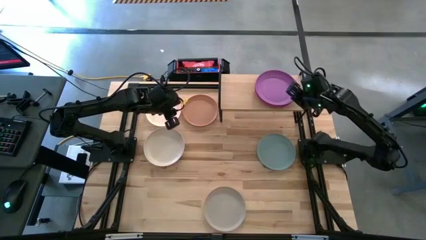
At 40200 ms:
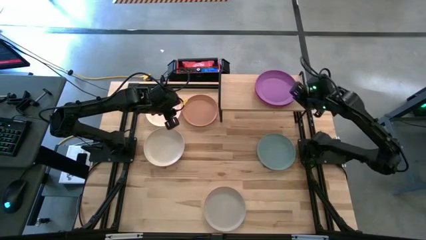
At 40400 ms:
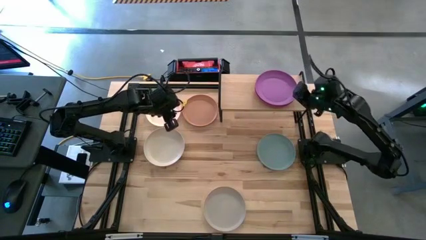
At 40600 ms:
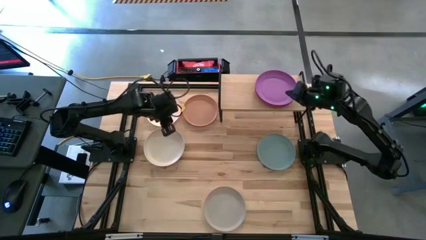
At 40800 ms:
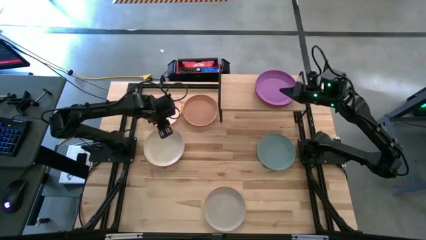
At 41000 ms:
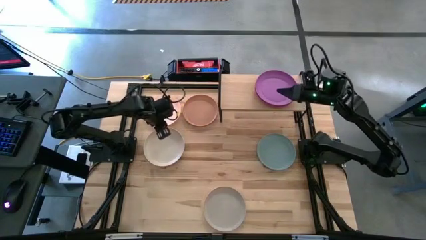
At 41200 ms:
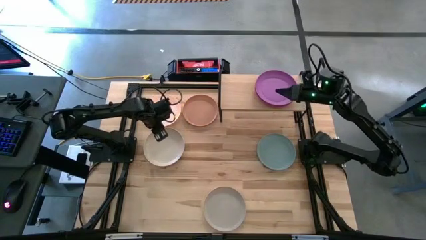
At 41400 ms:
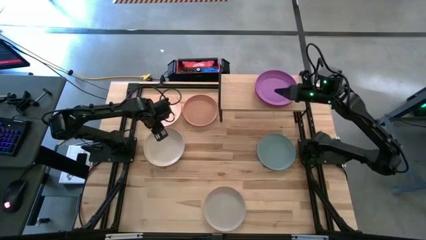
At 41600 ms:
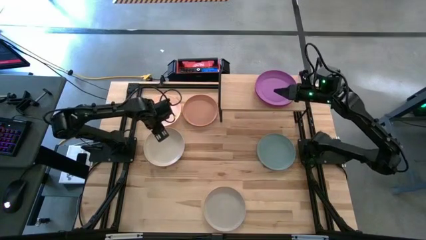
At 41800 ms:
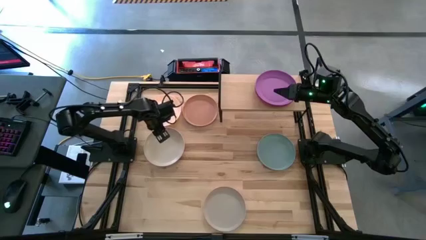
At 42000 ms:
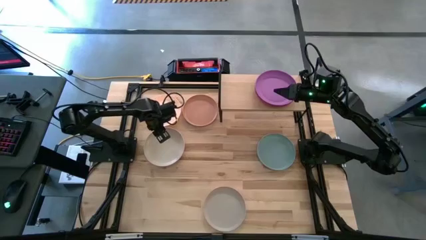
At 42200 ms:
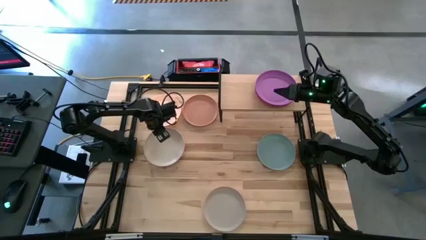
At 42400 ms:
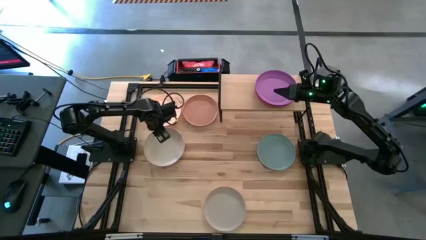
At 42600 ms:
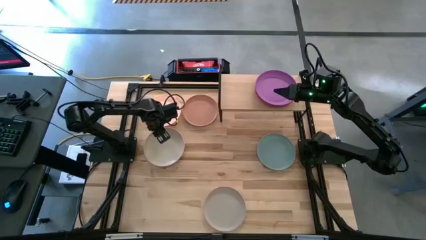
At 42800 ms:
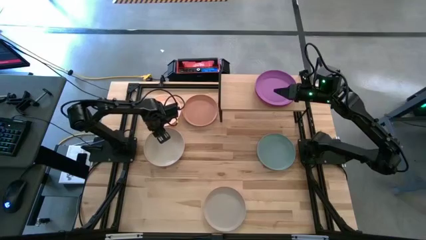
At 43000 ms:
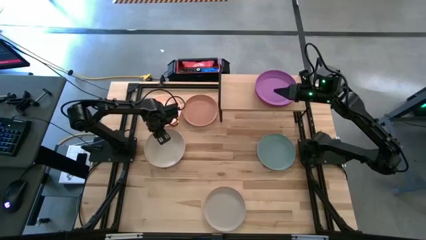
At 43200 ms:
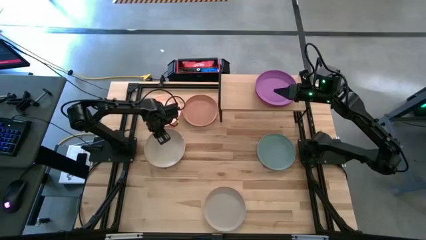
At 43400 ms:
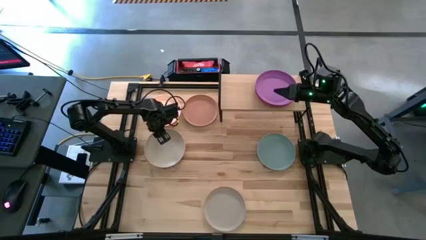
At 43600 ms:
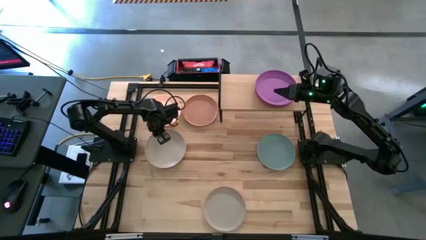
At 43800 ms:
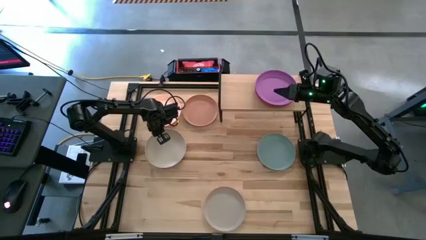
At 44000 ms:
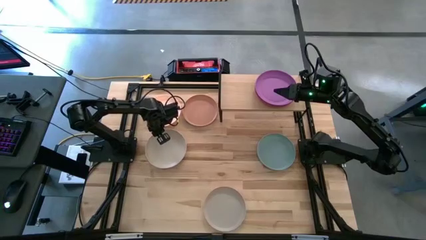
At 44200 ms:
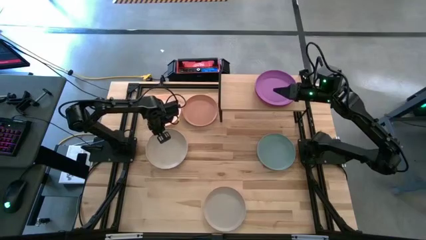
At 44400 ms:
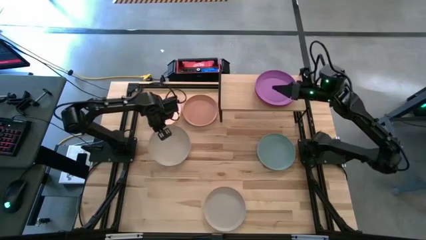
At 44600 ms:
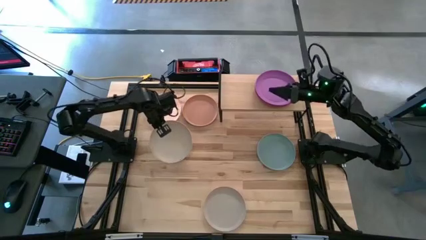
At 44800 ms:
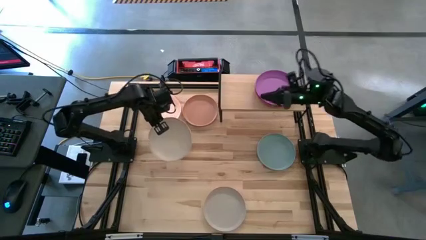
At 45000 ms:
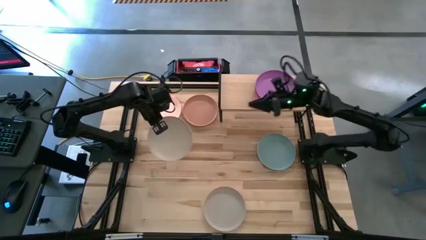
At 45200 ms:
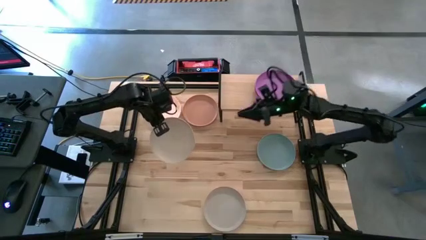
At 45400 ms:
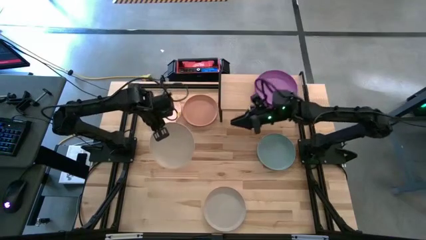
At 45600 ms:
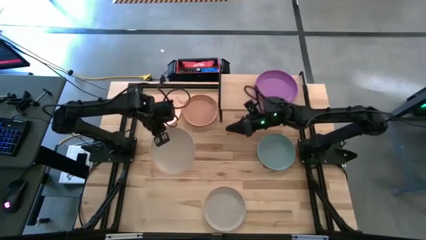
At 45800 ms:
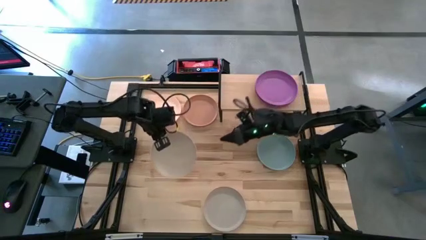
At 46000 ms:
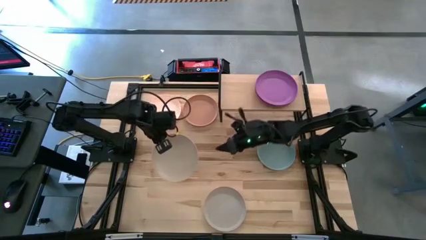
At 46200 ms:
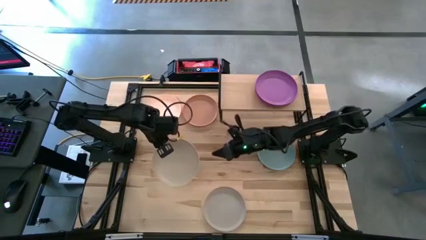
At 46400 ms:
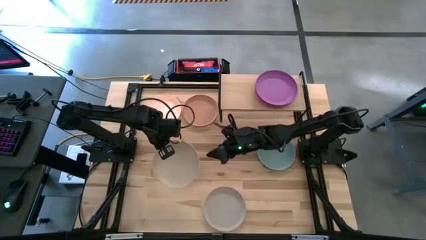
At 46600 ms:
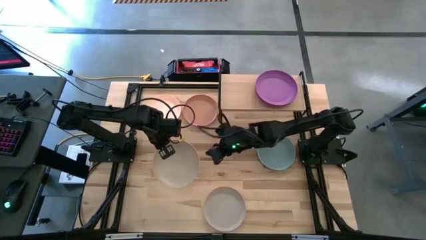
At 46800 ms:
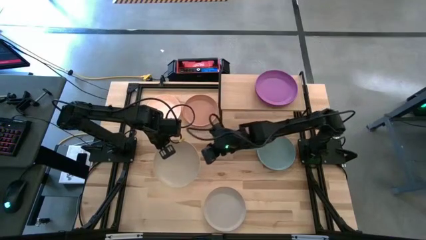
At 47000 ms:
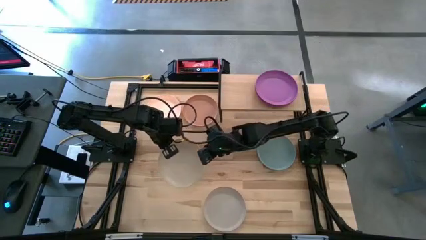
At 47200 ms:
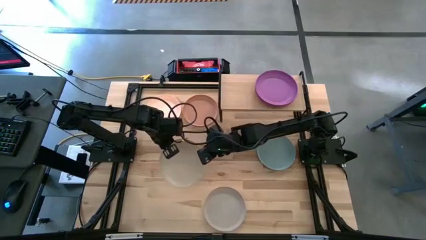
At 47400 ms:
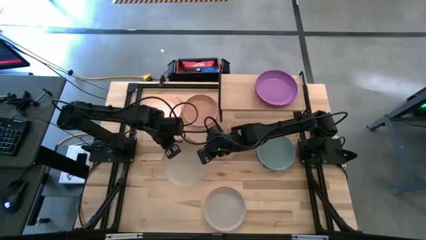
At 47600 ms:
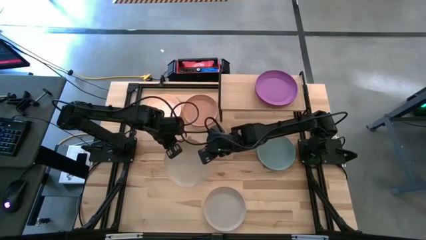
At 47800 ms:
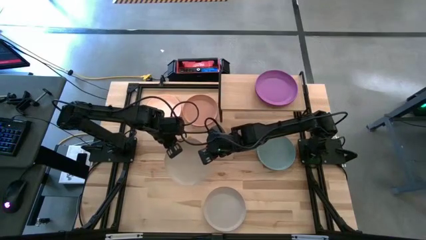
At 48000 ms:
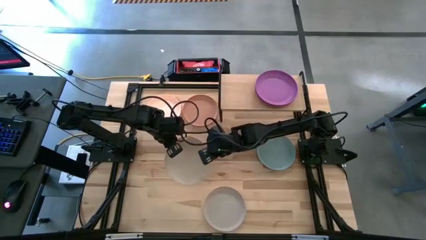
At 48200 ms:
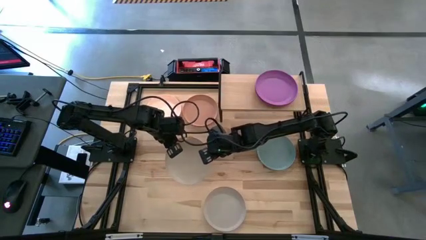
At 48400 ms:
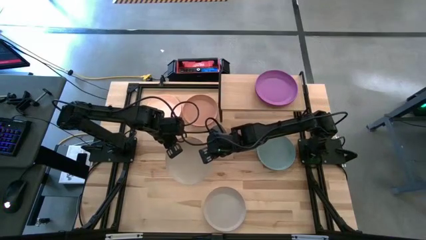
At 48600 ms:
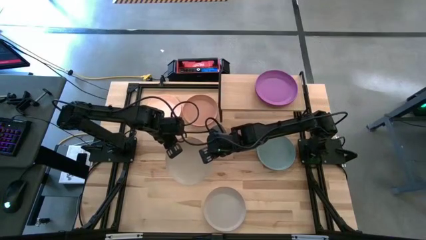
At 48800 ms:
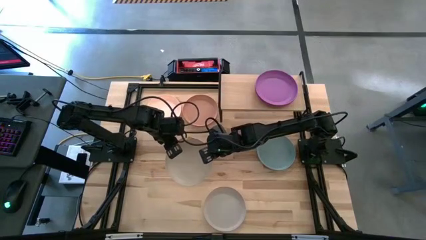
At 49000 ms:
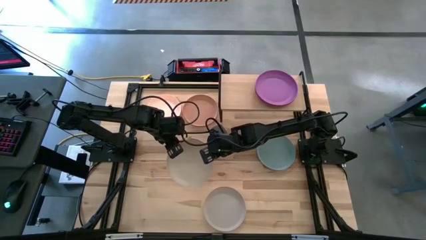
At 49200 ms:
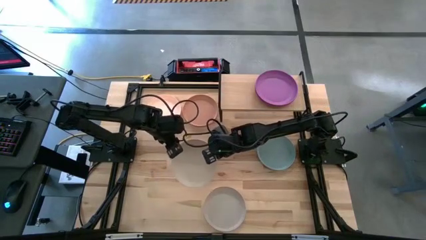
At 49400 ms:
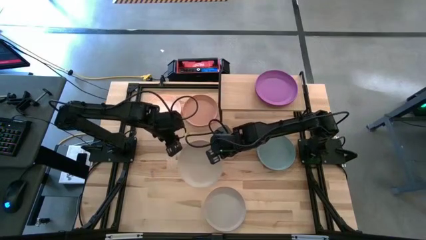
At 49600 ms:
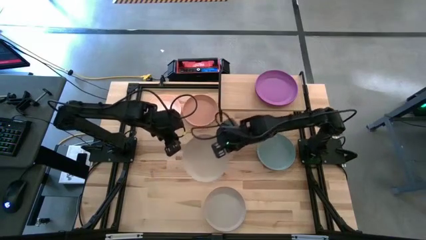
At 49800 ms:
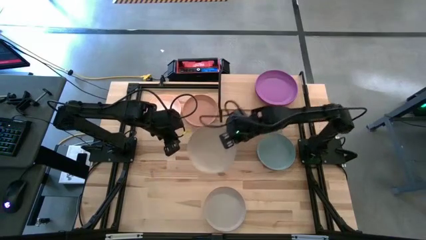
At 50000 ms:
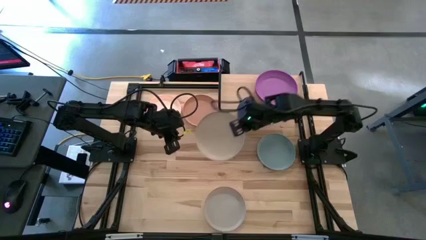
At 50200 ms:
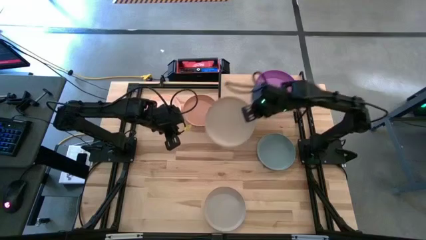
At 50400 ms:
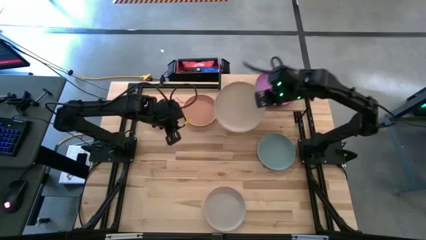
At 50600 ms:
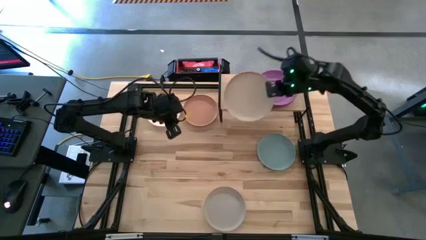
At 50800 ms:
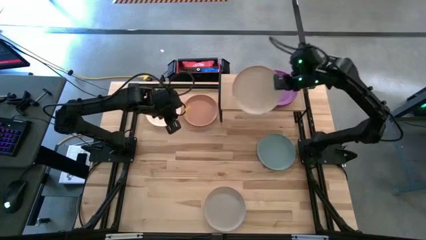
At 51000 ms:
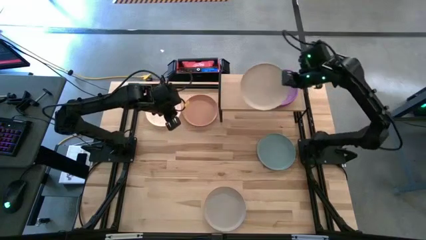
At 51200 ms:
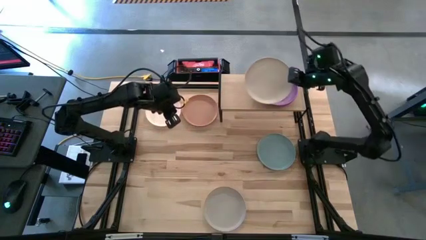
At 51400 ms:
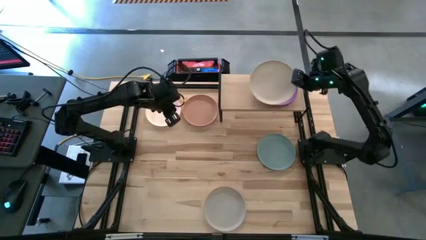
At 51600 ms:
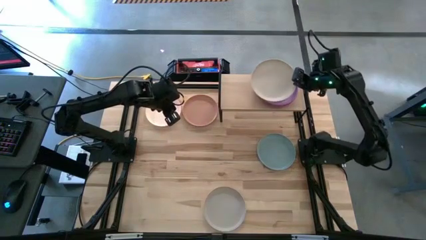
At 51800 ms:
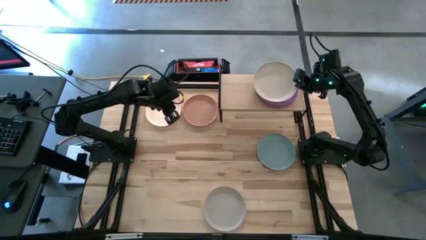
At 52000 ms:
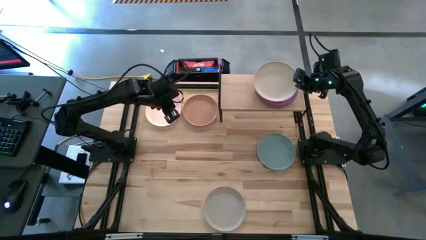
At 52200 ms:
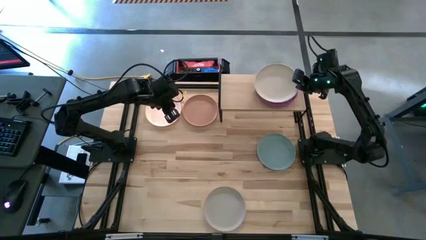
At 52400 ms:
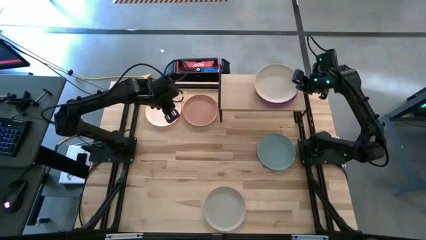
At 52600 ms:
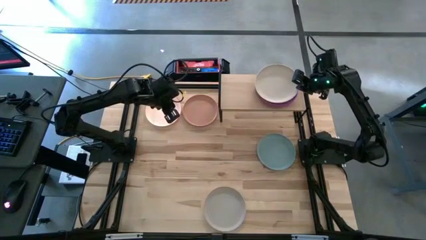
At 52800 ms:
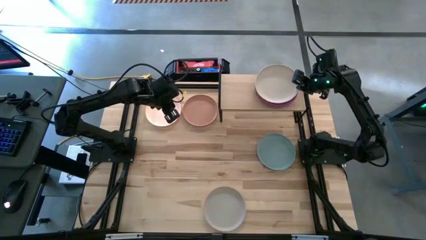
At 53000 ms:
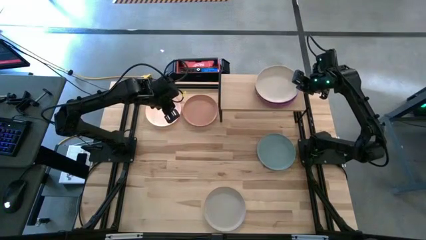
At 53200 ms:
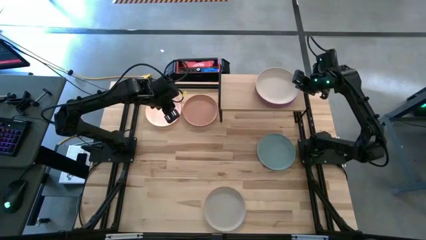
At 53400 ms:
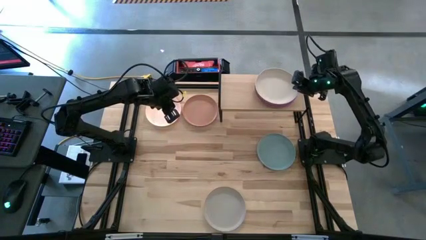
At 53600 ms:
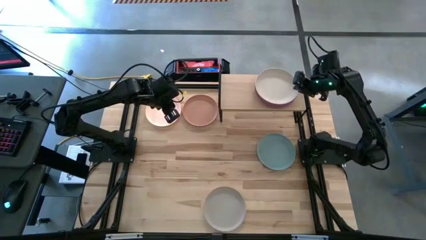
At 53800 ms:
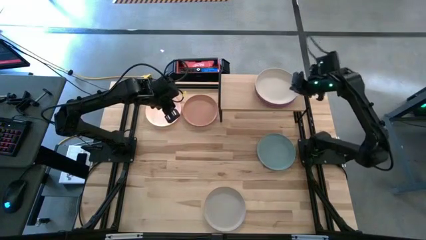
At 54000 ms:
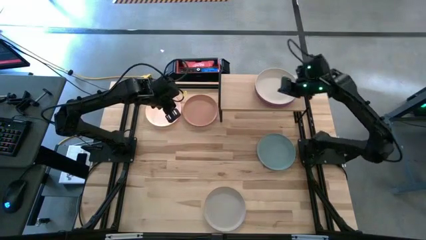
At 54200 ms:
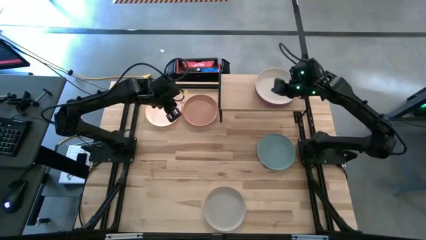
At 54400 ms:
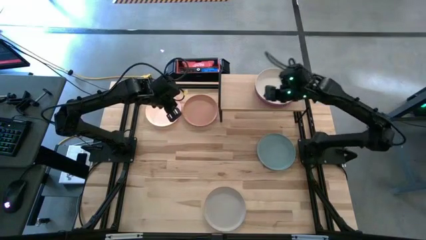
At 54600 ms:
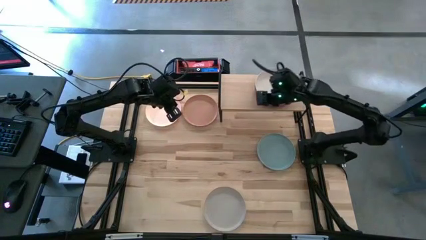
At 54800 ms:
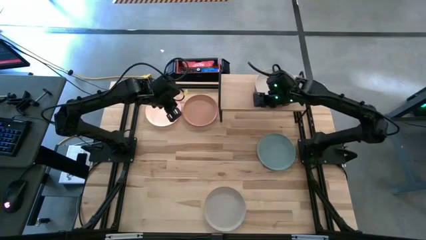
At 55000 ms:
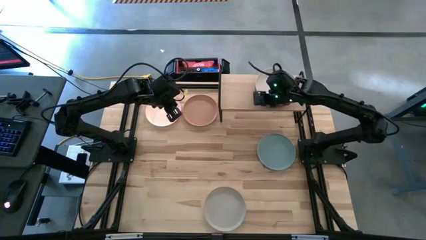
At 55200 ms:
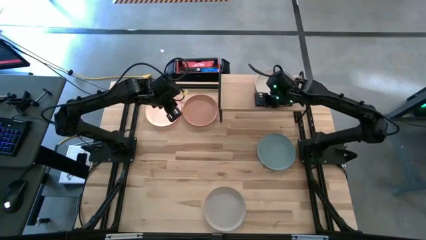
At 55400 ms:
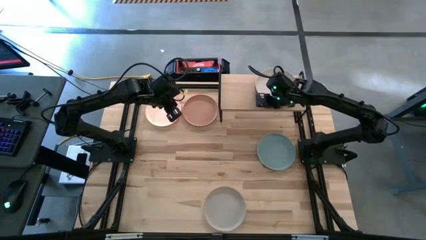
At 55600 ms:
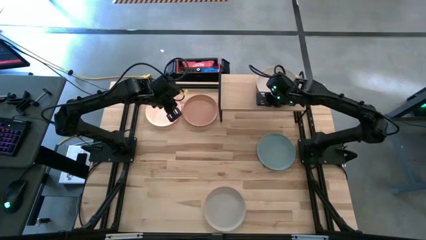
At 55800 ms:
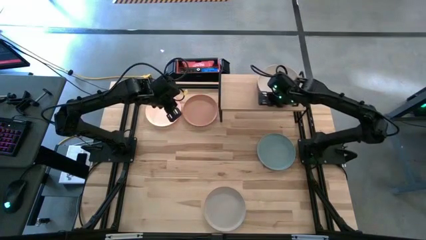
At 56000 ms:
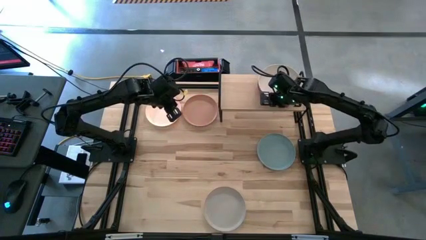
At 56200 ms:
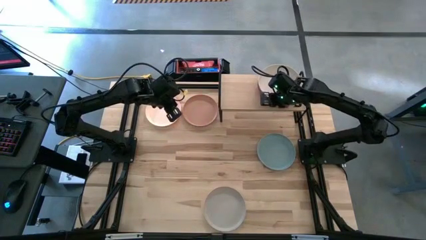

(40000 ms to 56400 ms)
Task: Place and stack plates onto a shelf
Stack the white plate on top of the purple plate on the shelf
